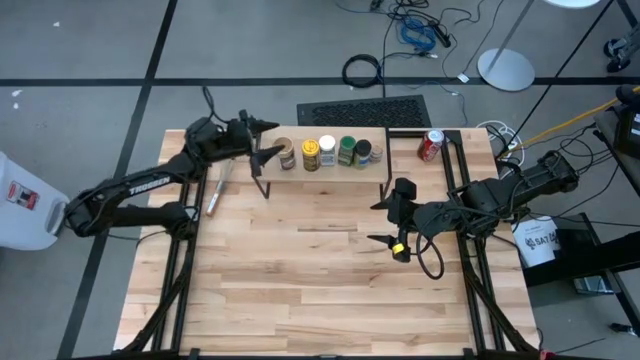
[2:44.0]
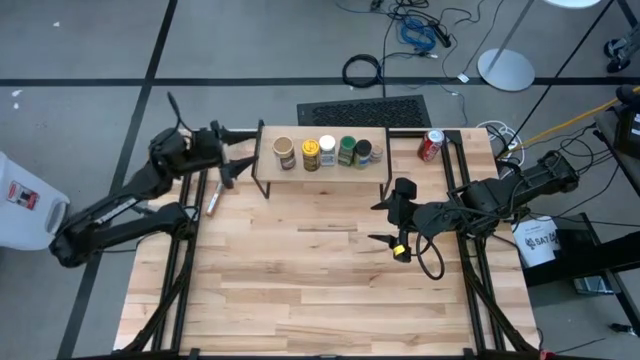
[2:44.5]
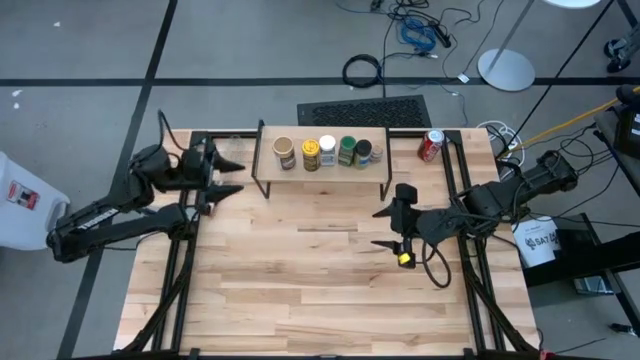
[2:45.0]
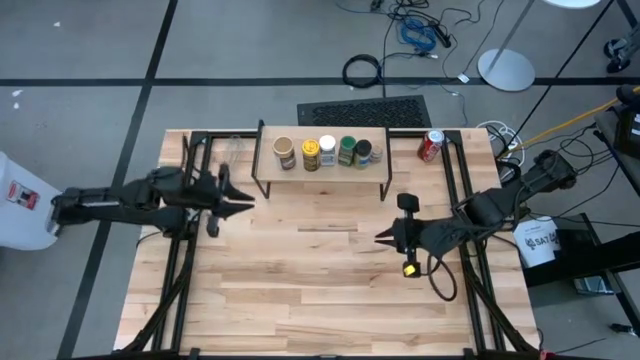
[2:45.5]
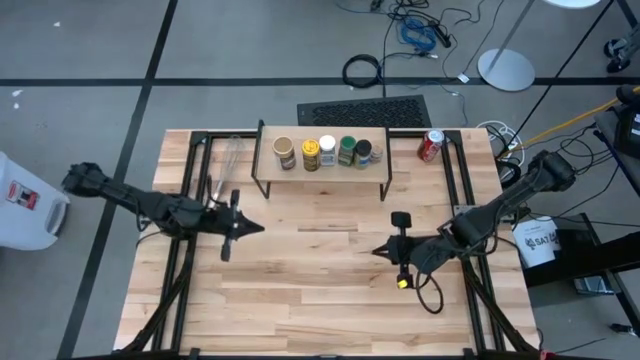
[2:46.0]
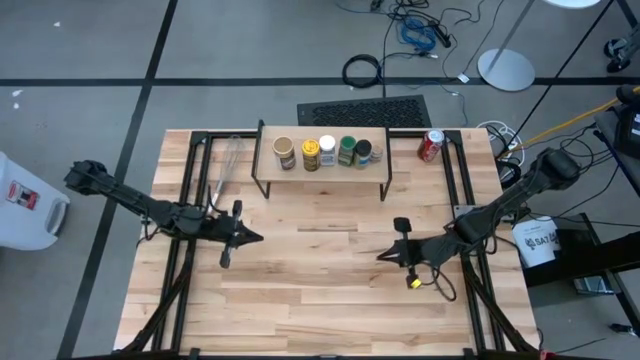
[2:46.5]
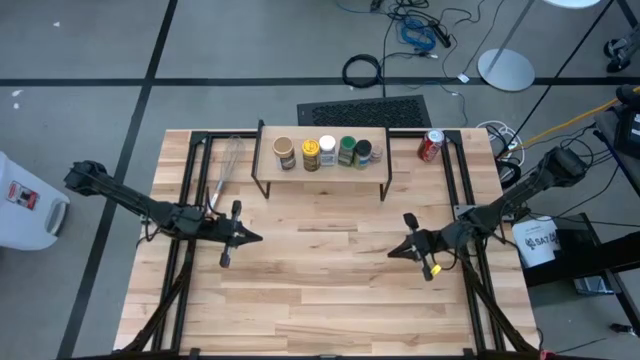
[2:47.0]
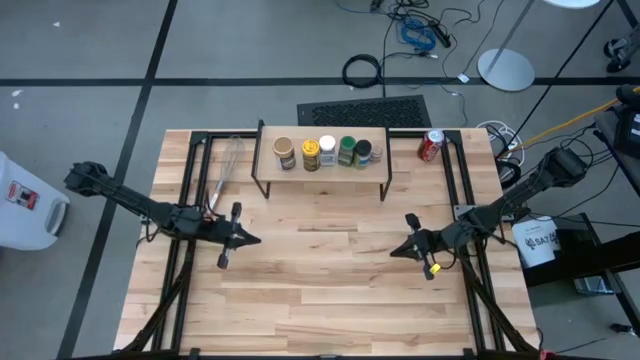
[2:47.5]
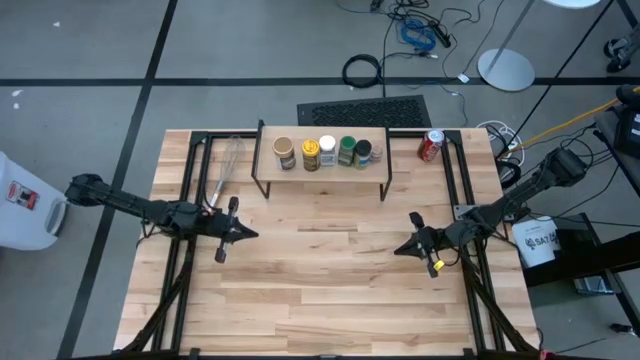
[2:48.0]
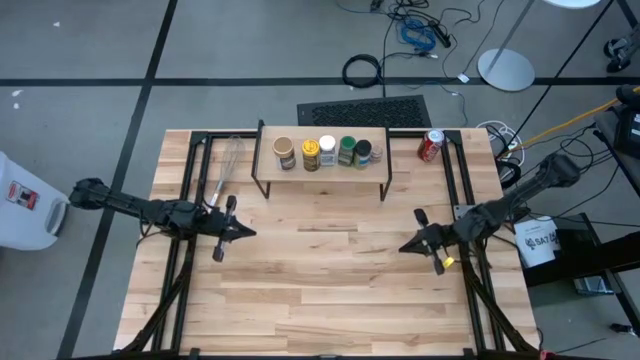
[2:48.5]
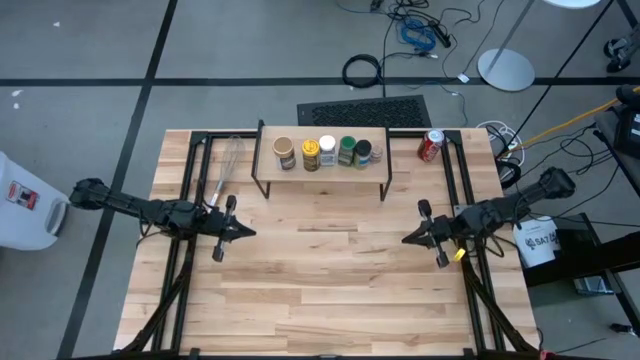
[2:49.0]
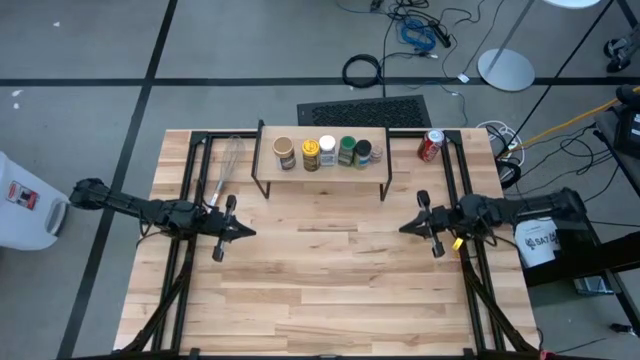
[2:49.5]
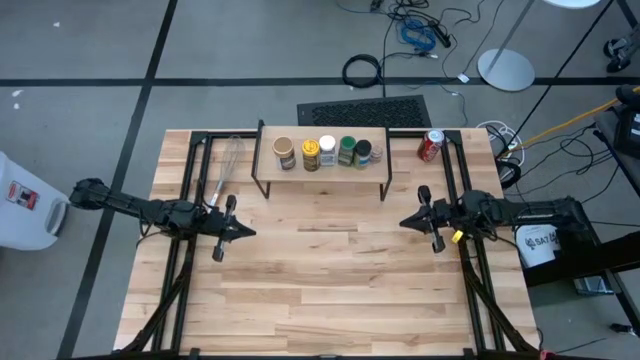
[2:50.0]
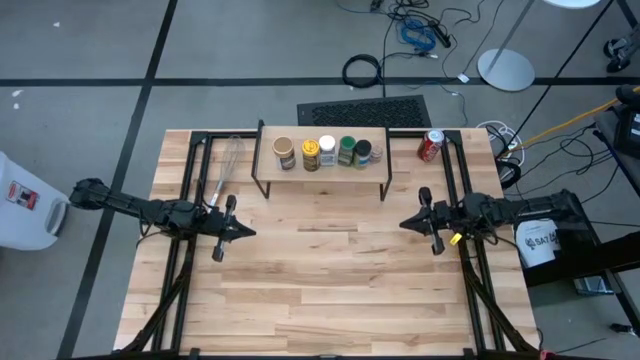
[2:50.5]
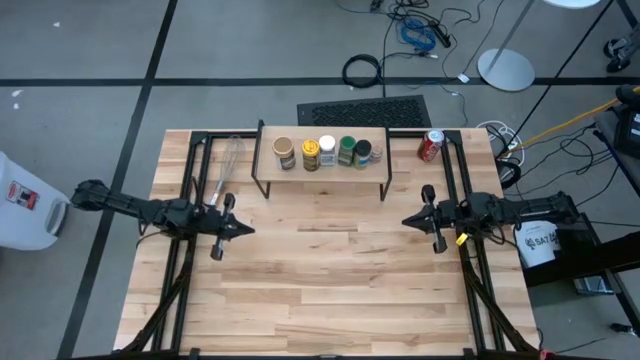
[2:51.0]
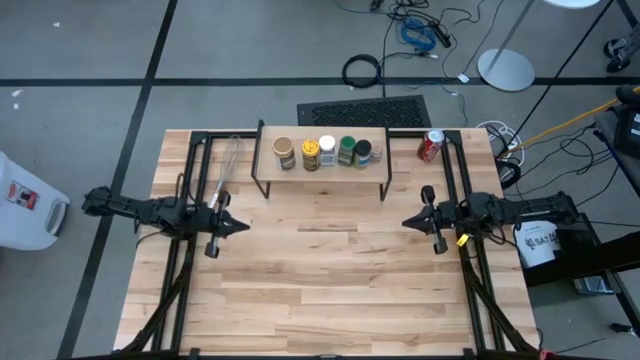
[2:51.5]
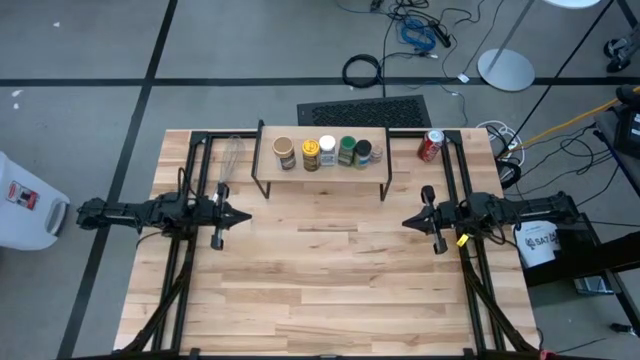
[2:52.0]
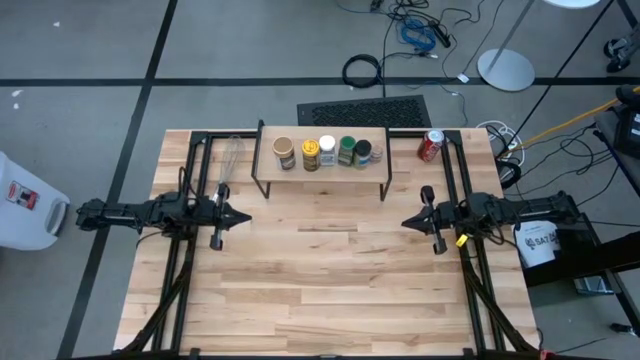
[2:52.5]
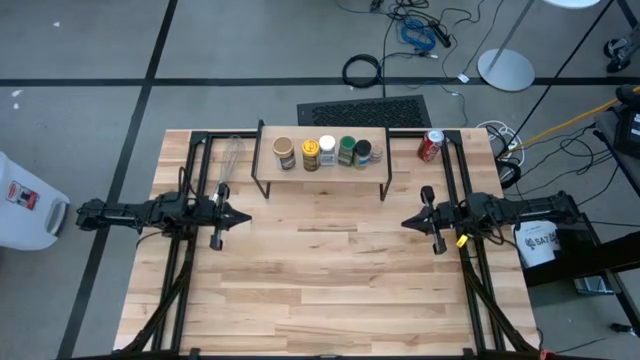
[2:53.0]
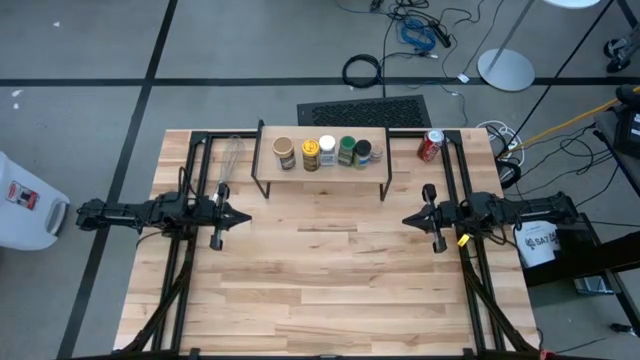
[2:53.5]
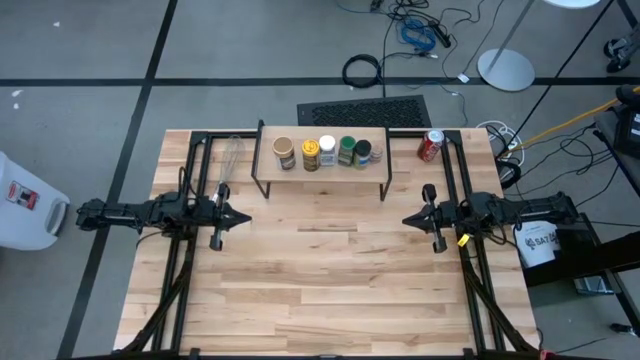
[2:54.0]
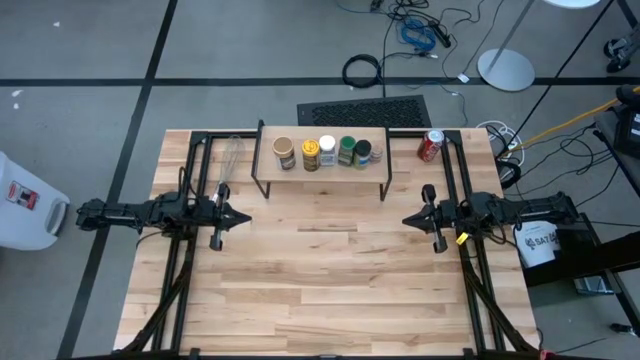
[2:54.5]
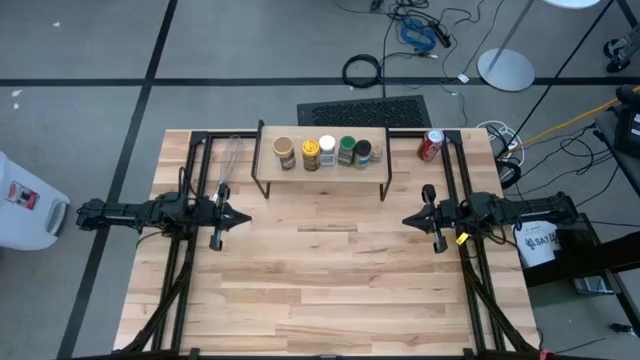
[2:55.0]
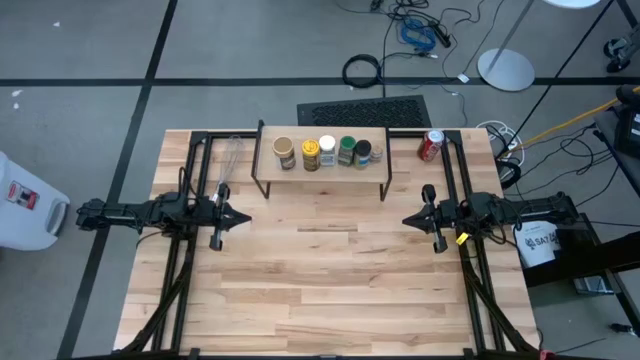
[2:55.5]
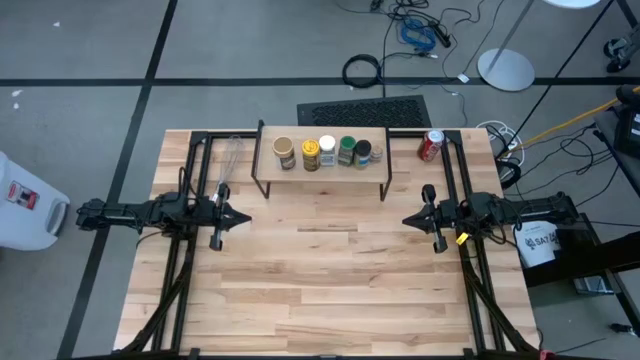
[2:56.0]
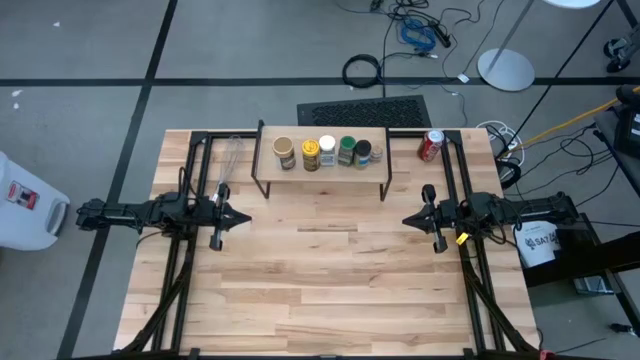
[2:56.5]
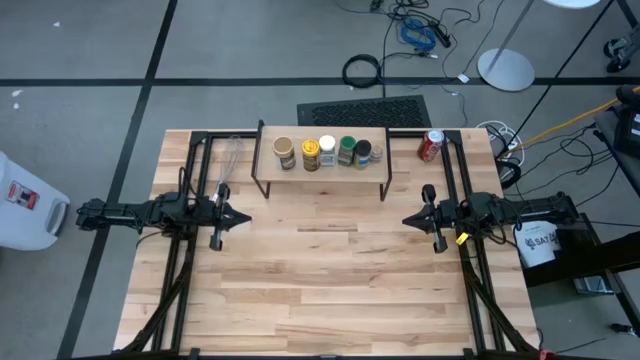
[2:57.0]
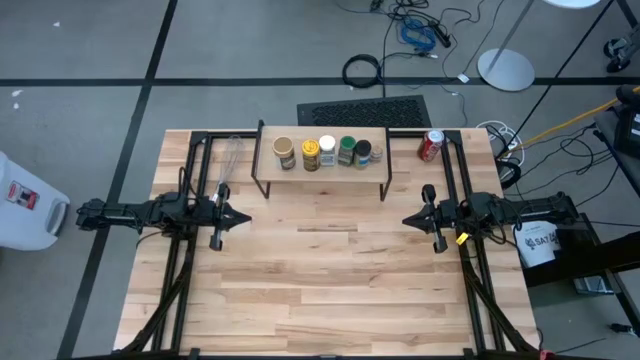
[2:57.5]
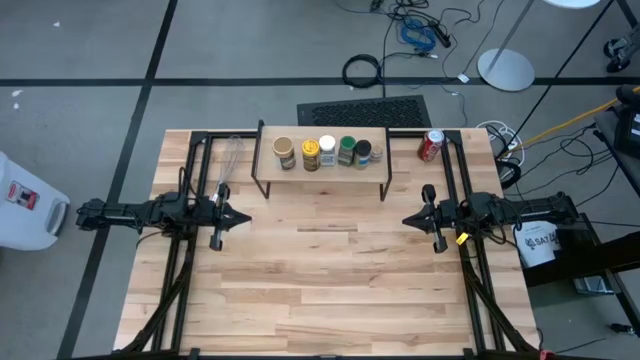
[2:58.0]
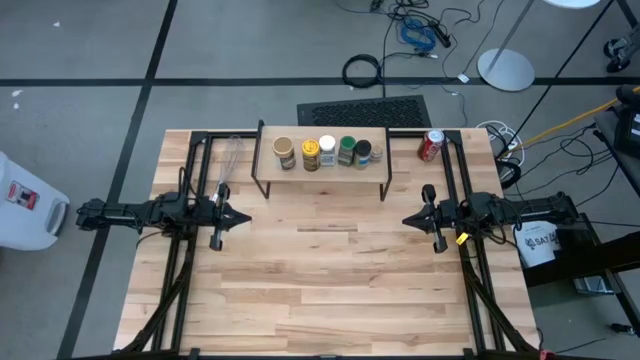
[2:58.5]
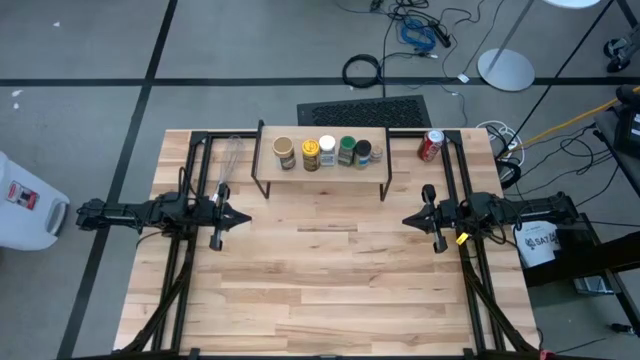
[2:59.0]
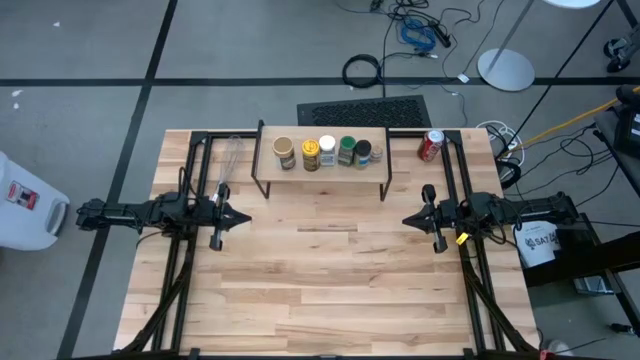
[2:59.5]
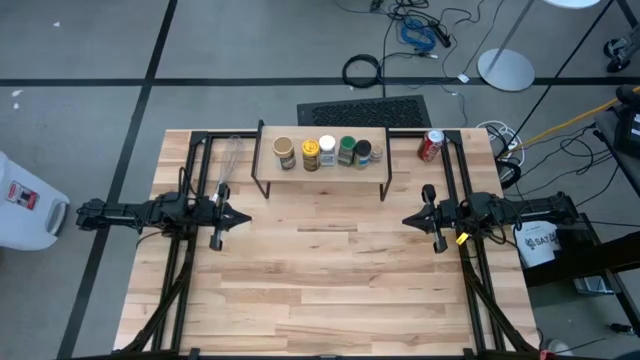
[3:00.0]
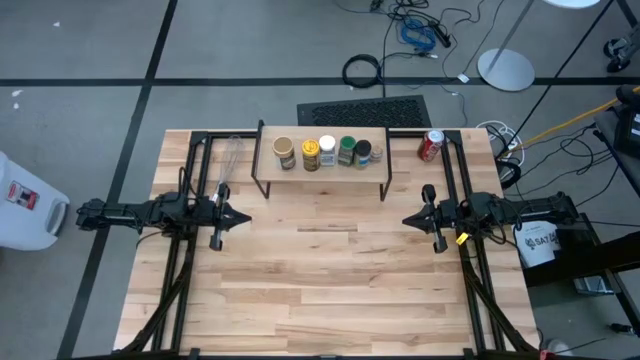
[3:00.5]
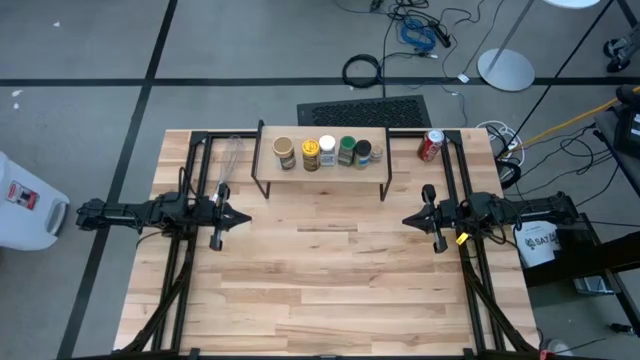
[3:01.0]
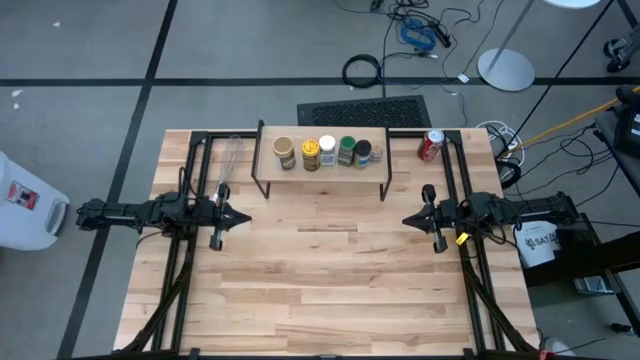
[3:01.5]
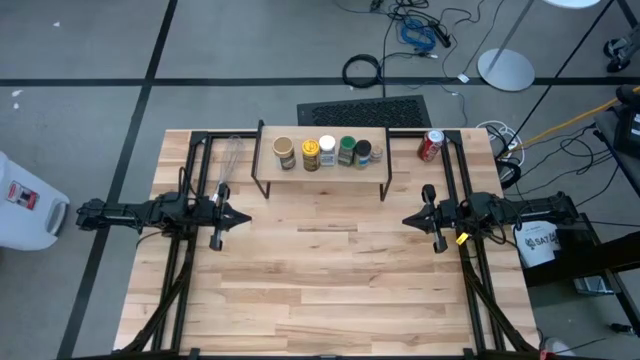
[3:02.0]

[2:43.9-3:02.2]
Task: Shelf spices
Return to Home Position

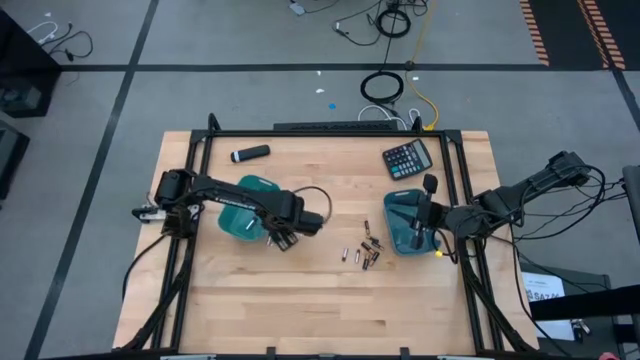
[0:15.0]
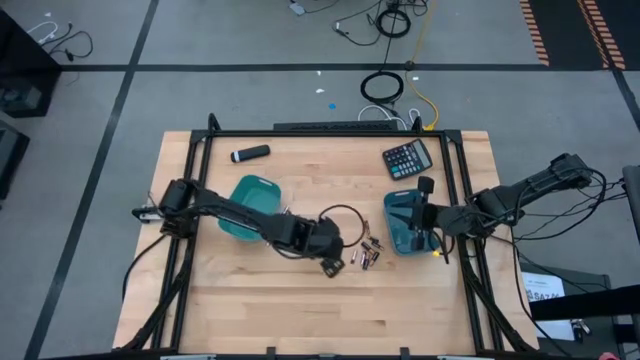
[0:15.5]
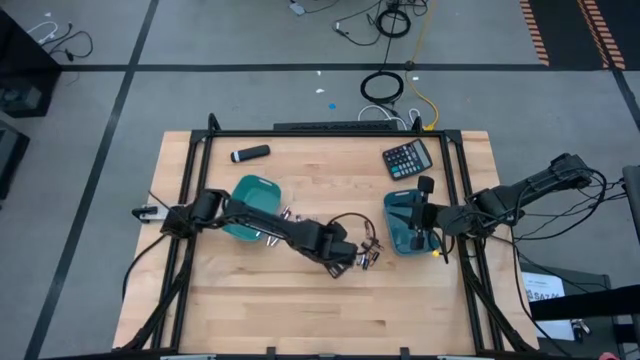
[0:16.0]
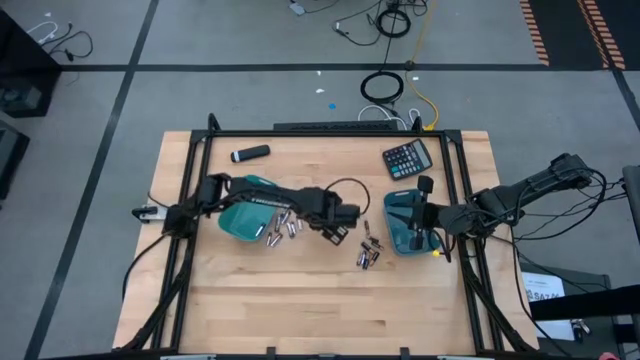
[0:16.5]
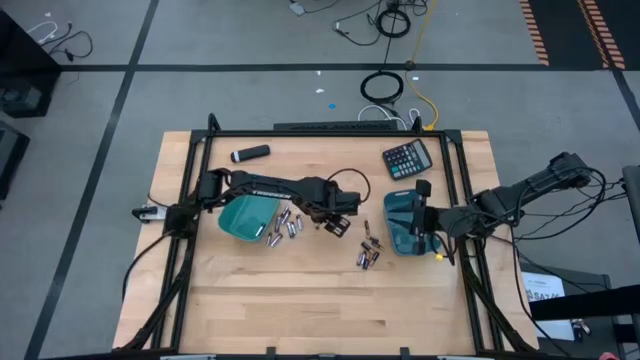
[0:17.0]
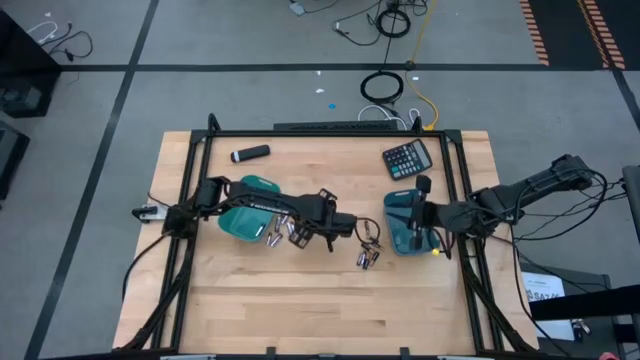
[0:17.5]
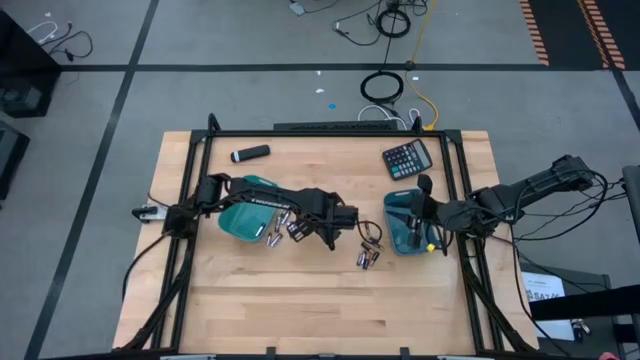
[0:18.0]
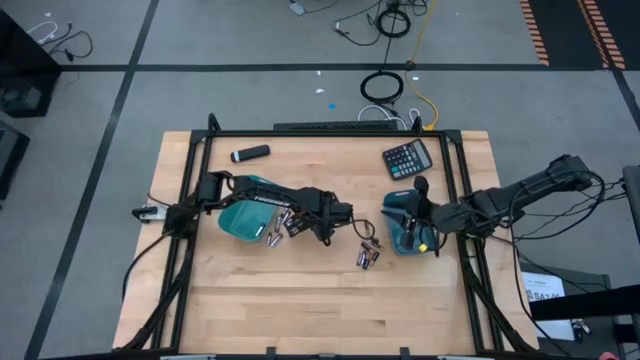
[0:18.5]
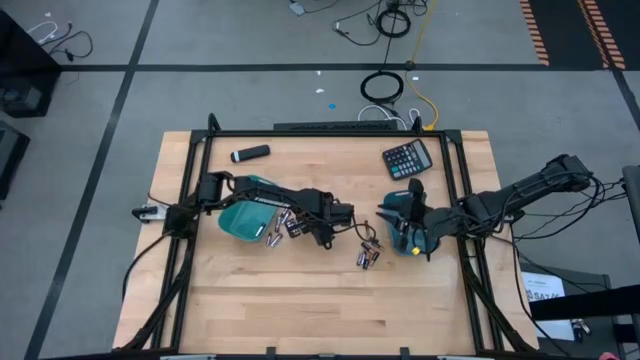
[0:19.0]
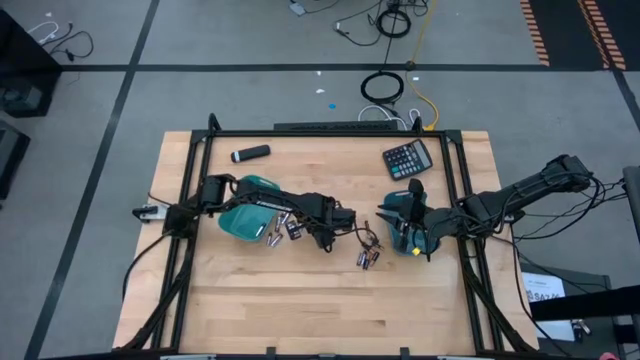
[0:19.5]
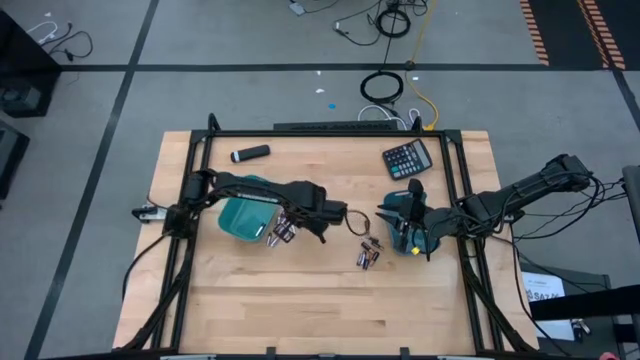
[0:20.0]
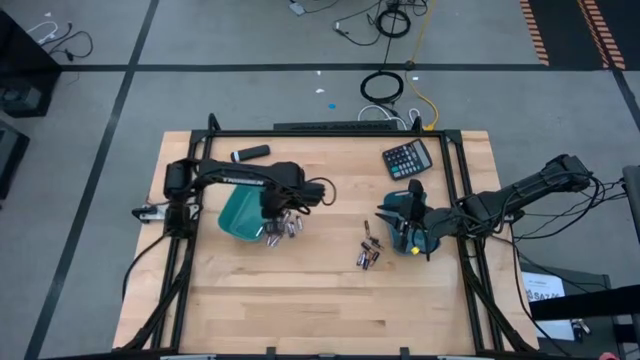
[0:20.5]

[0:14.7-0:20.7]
Task: Sort batteries
Put the silver battery into the green bin
